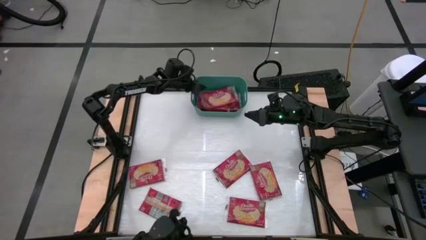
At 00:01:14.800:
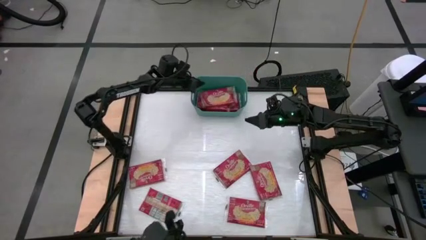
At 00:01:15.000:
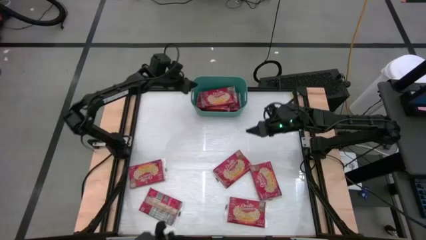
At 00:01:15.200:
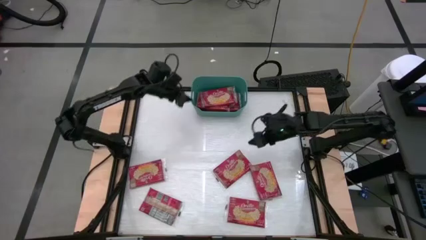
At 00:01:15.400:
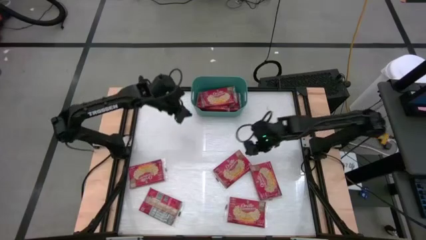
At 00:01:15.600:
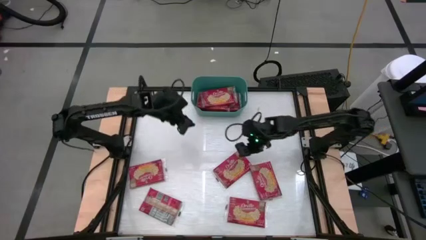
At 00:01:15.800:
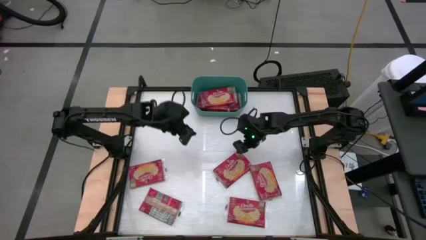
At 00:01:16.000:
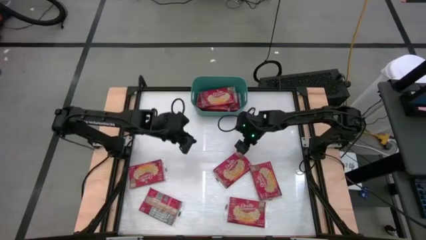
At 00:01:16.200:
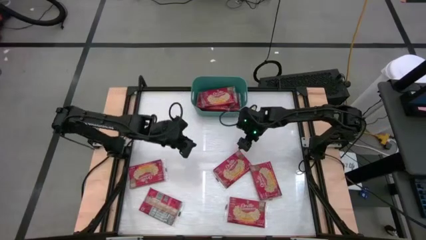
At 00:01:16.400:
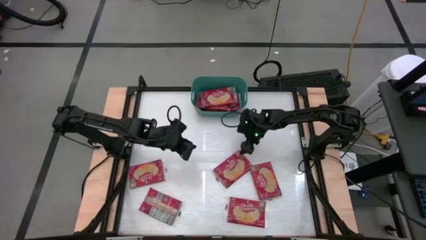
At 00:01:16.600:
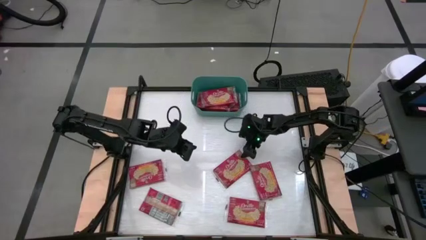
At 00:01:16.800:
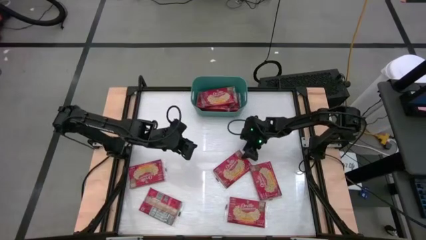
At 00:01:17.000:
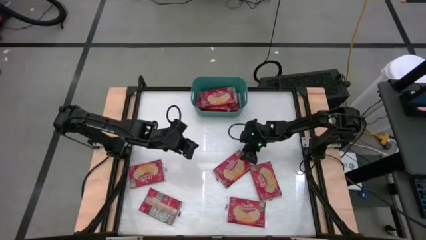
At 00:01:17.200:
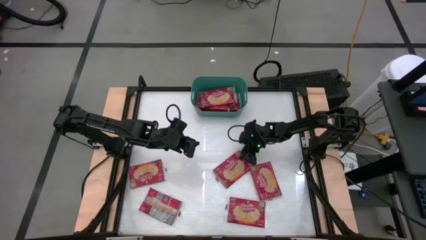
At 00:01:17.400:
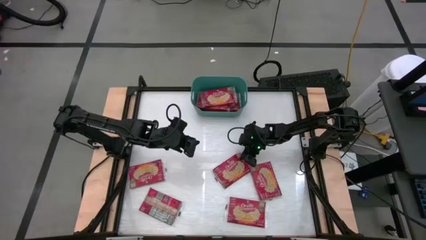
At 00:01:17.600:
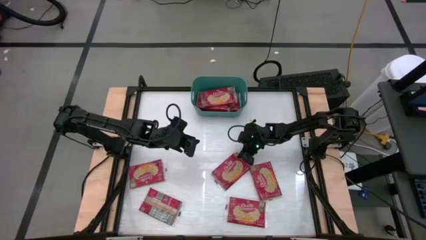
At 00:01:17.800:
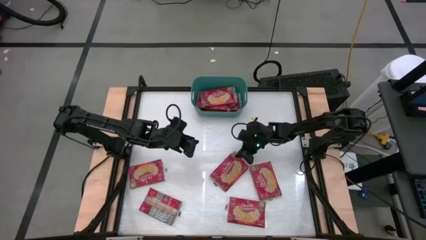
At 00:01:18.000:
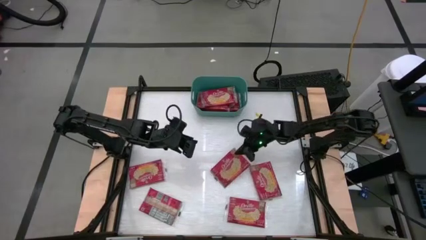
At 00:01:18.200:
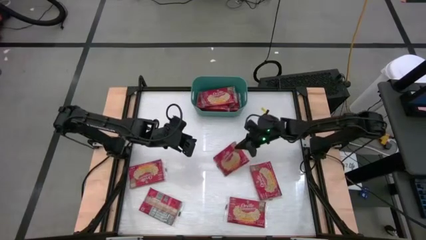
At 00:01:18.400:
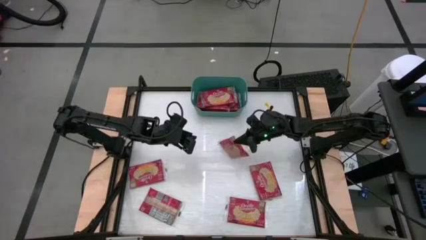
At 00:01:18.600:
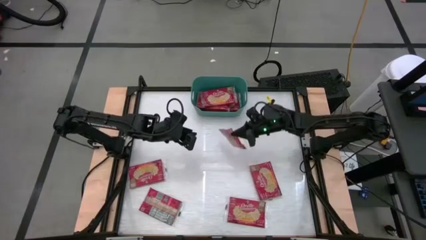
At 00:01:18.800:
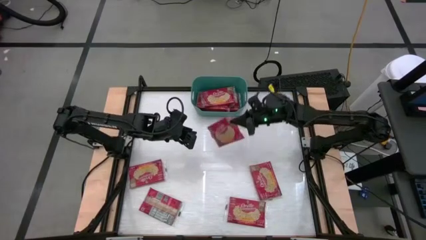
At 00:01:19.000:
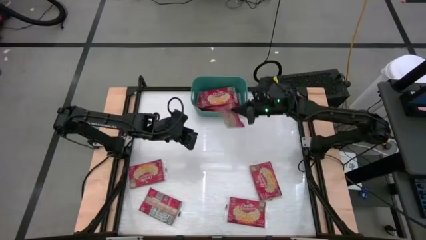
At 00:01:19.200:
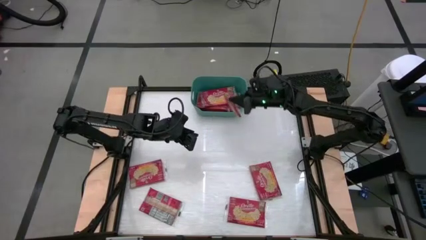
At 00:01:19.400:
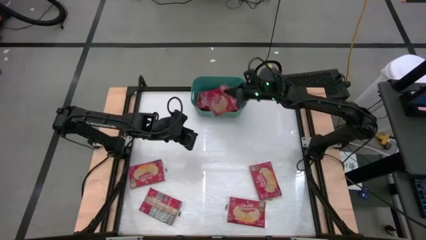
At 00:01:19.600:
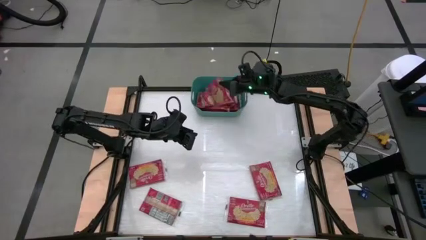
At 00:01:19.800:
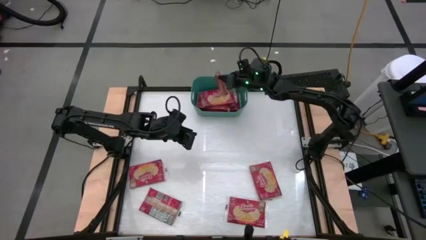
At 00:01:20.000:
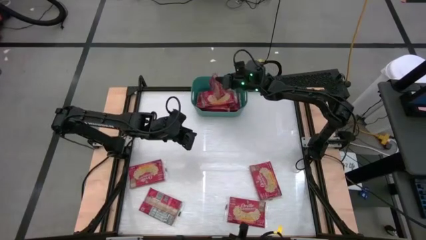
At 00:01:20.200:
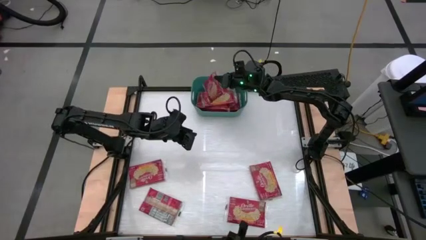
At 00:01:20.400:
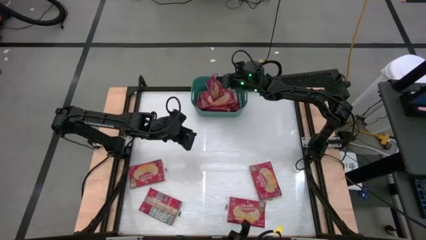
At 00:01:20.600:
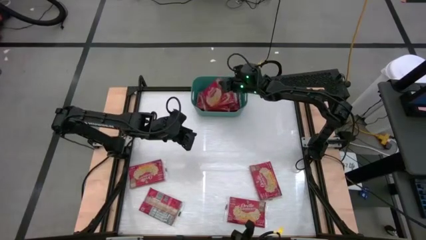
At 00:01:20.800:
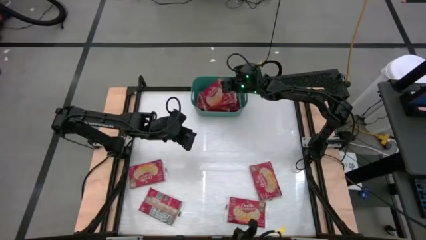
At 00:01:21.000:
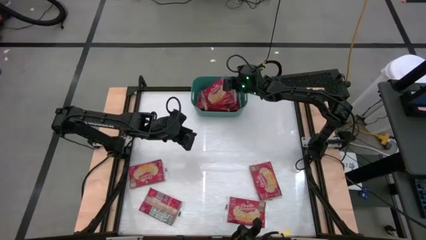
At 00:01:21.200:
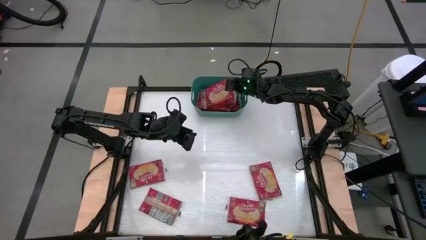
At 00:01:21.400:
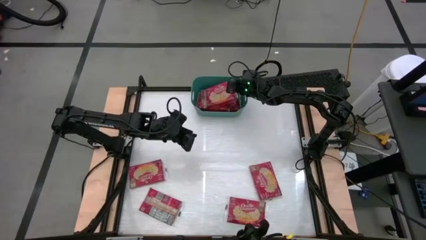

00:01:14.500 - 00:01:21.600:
Task: Sort popcorn bags into baskets
Put the popcorn bag into the green bin

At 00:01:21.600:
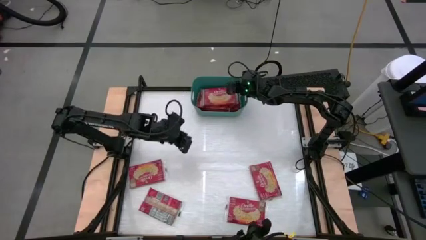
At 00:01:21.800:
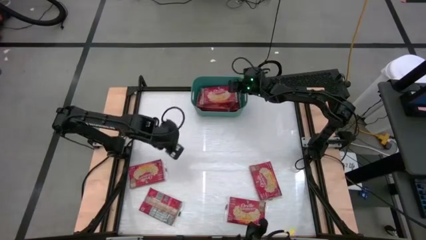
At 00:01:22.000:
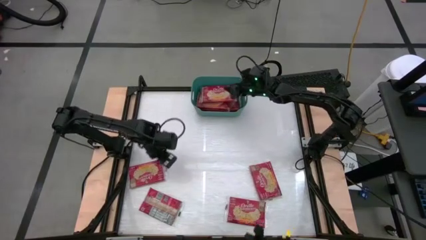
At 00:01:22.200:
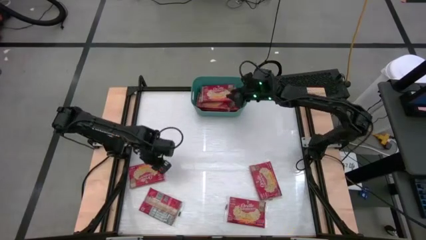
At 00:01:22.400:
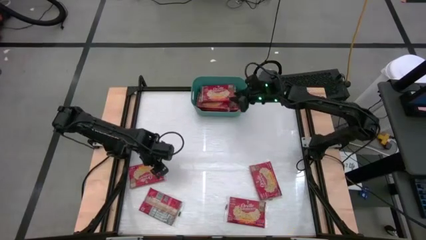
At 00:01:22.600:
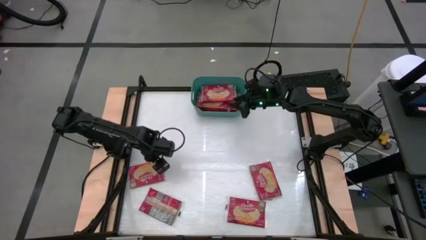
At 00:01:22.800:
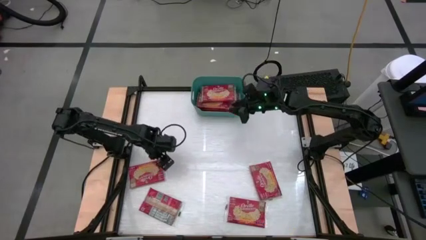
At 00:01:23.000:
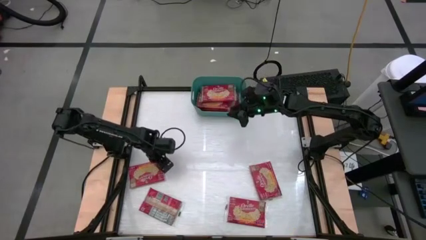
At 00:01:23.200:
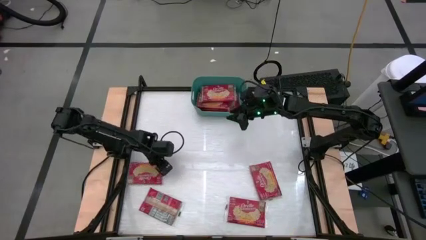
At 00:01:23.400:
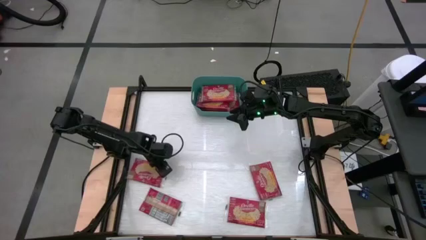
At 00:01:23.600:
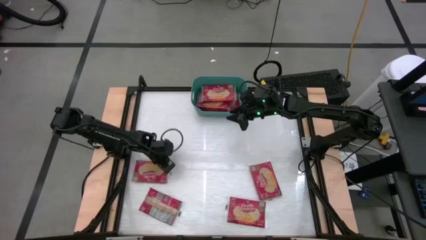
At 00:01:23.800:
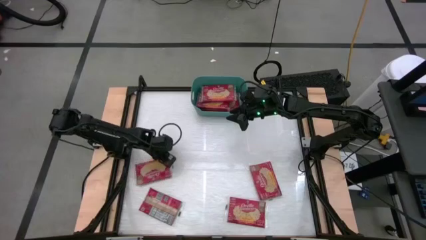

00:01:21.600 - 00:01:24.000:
Put the popcorn bag into the green bin

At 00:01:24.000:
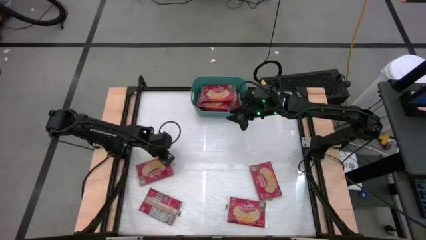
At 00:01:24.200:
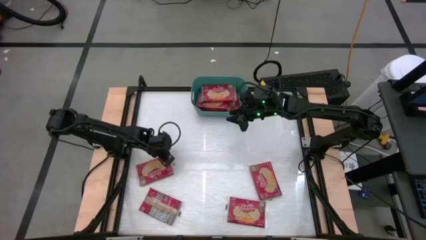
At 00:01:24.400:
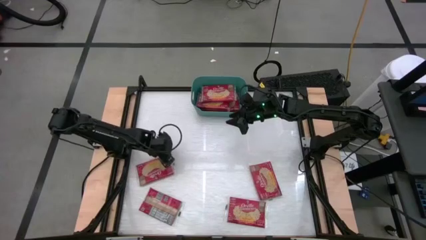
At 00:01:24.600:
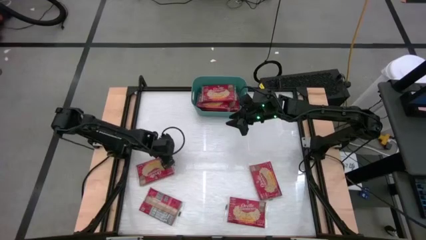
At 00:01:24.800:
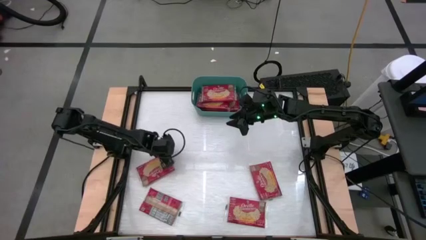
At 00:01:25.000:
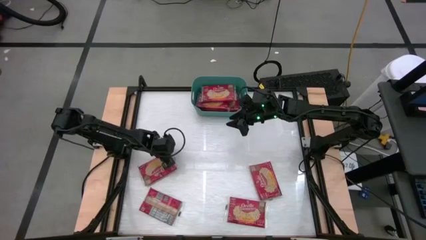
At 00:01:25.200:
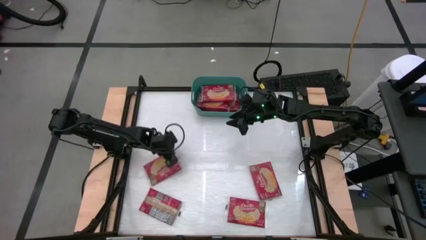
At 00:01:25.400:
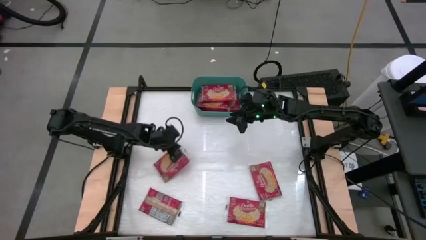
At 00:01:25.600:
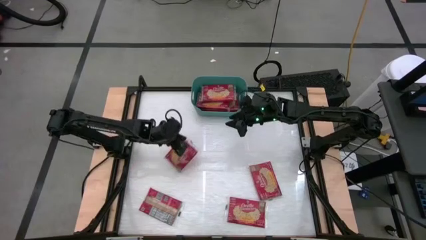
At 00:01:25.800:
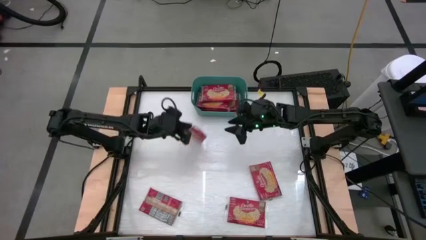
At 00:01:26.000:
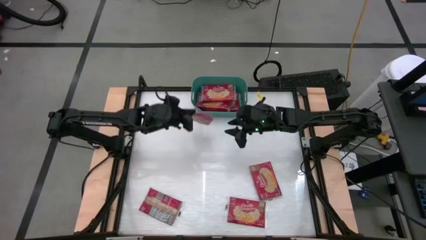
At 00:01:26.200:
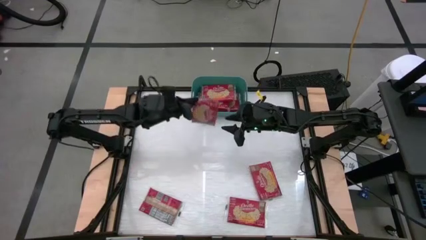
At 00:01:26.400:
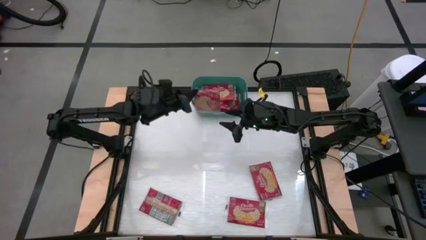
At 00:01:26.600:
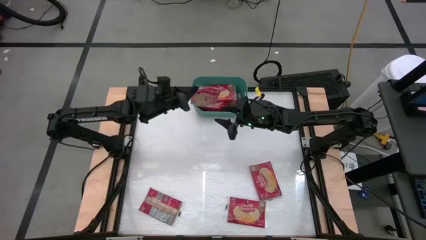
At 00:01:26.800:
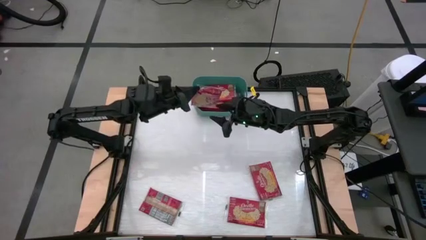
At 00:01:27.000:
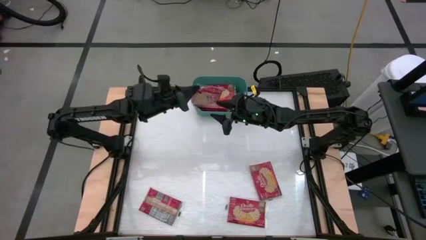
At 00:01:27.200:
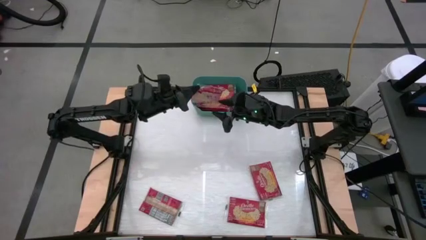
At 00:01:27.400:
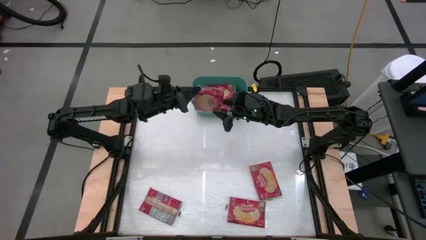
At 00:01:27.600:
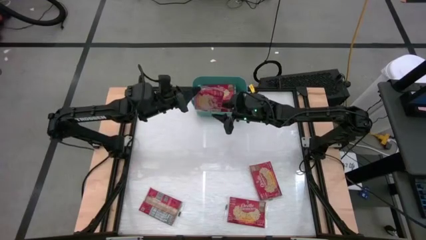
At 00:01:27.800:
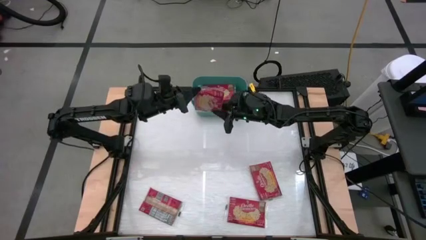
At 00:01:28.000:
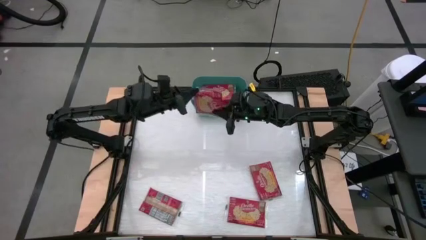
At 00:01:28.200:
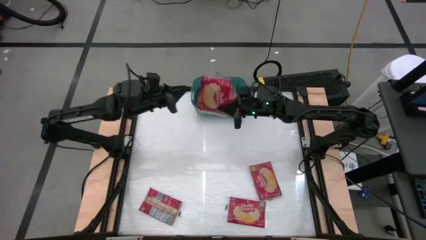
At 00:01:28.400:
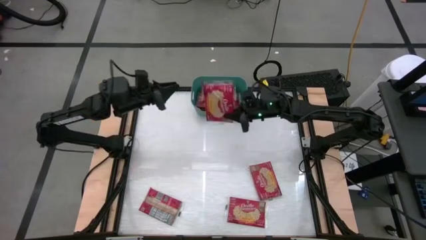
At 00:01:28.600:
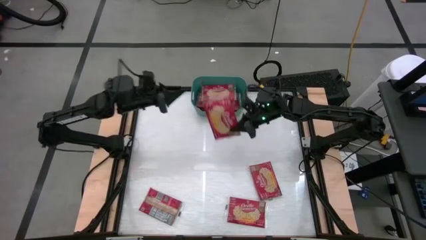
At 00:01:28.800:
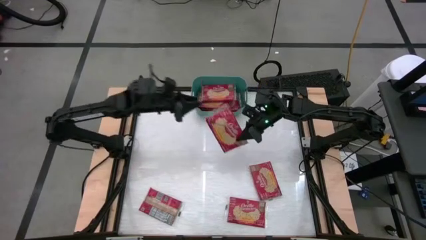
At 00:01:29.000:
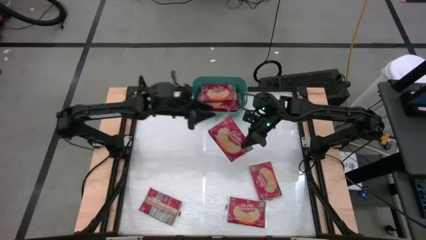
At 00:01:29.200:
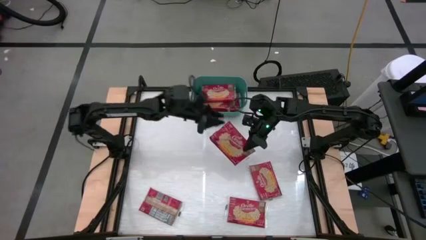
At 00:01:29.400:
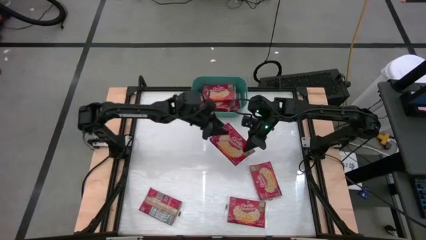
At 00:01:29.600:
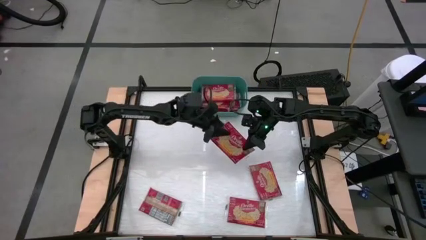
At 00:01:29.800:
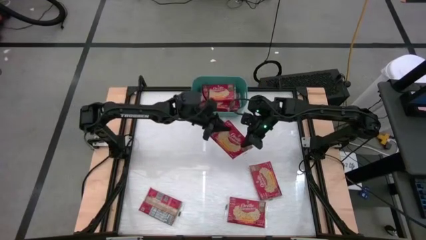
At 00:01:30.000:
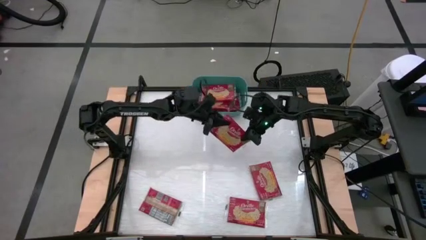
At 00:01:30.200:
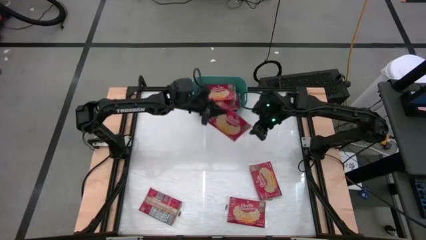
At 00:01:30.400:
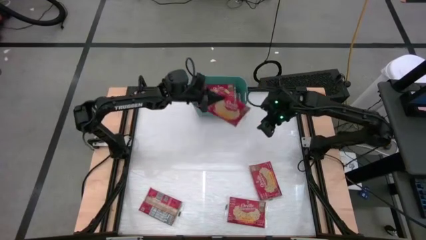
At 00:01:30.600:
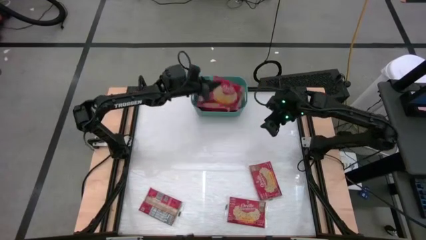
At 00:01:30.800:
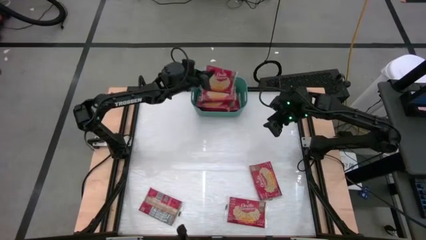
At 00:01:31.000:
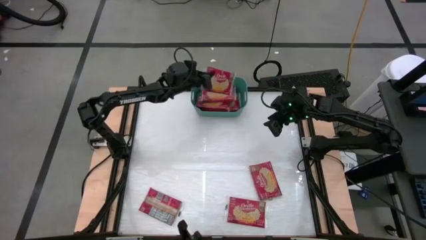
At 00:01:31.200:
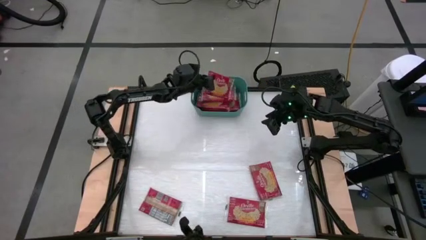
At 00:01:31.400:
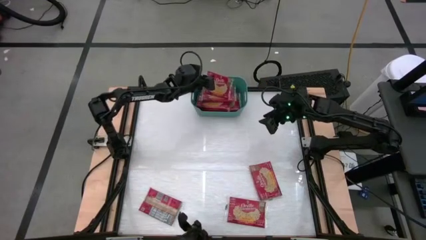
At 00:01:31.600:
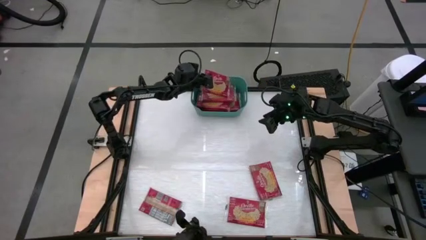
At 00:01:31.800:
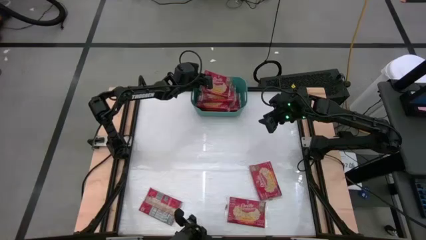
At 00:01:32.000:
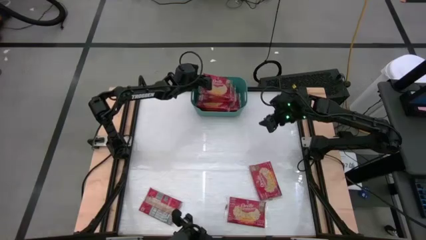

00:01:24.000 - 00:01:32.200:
Put the popcorn bag into the green bin
